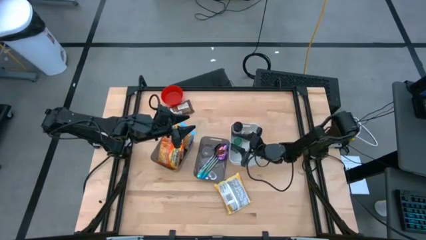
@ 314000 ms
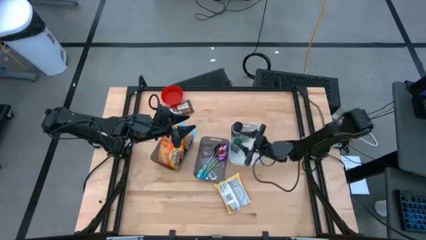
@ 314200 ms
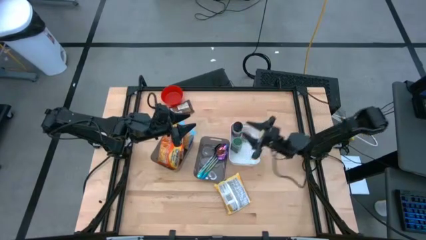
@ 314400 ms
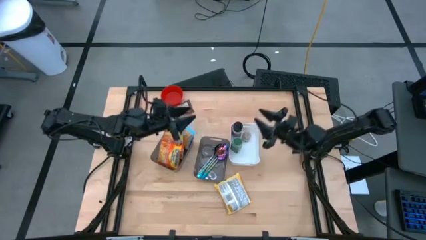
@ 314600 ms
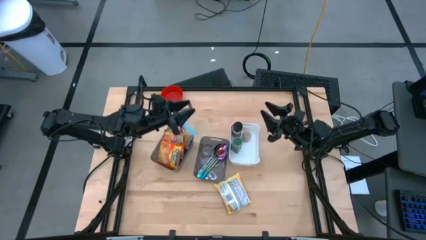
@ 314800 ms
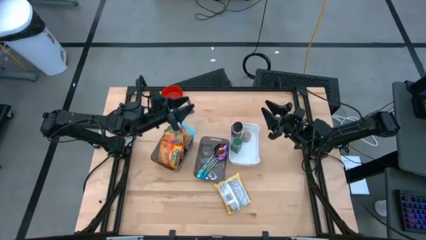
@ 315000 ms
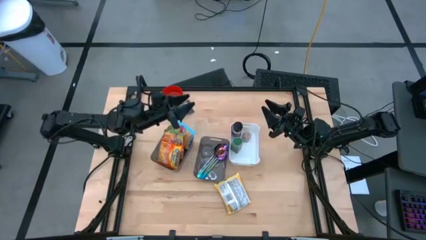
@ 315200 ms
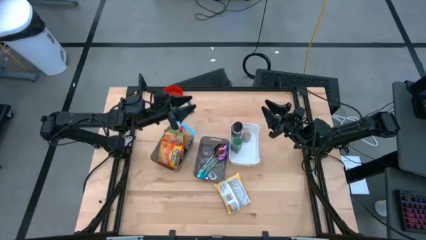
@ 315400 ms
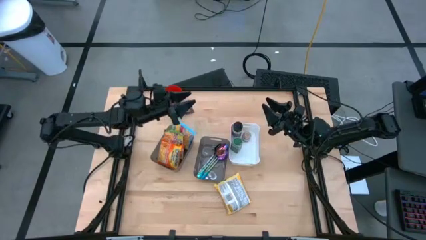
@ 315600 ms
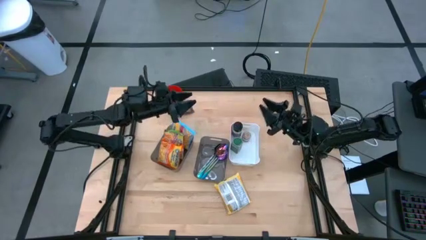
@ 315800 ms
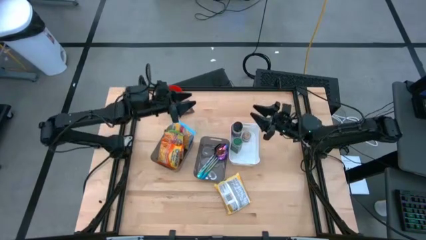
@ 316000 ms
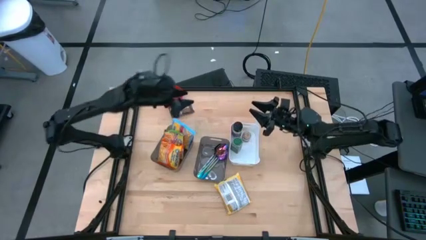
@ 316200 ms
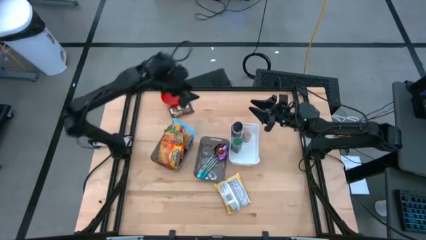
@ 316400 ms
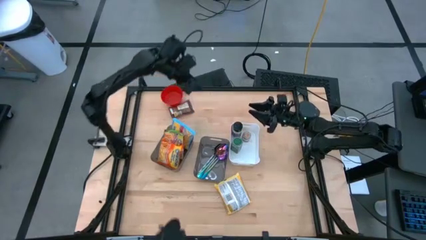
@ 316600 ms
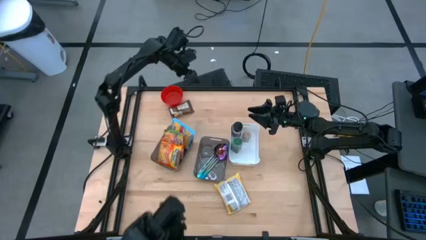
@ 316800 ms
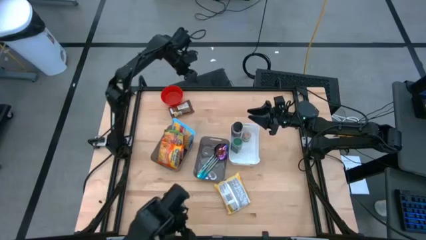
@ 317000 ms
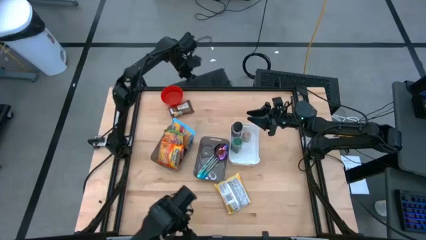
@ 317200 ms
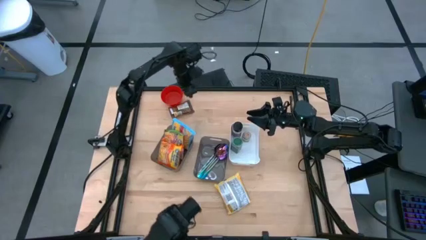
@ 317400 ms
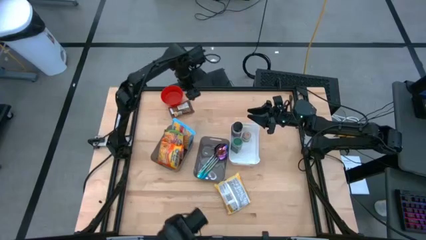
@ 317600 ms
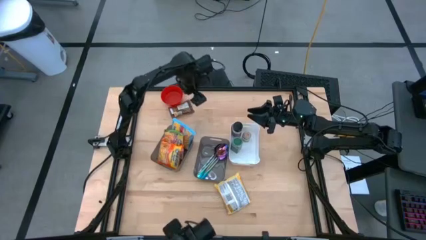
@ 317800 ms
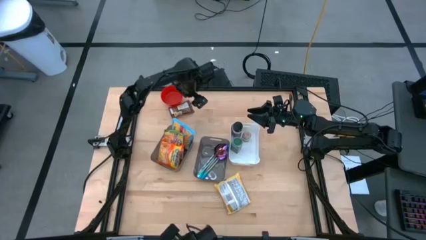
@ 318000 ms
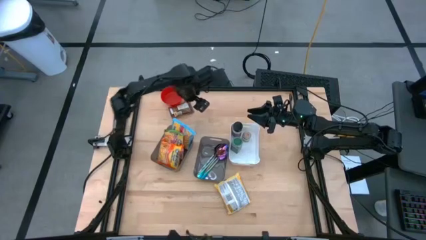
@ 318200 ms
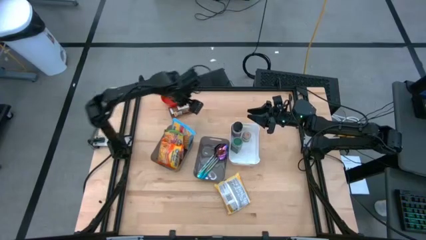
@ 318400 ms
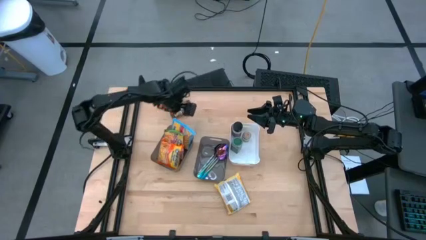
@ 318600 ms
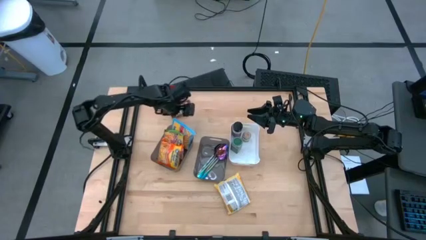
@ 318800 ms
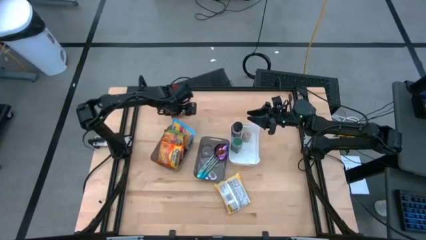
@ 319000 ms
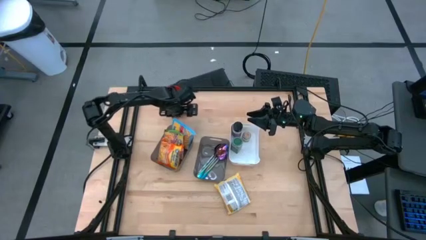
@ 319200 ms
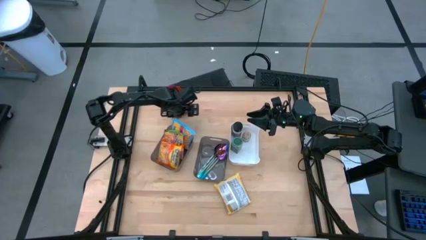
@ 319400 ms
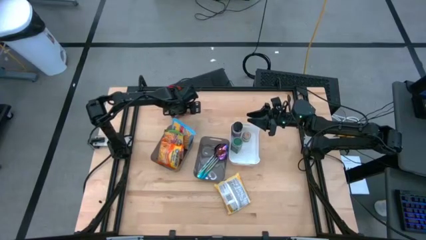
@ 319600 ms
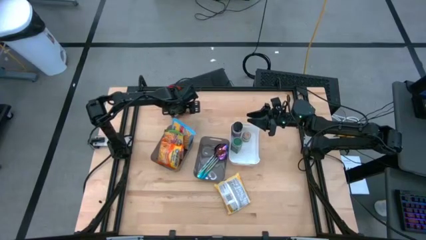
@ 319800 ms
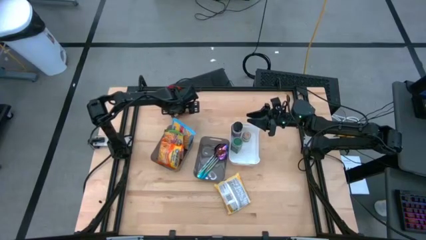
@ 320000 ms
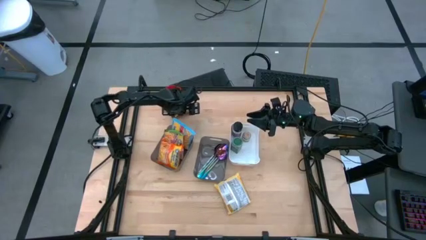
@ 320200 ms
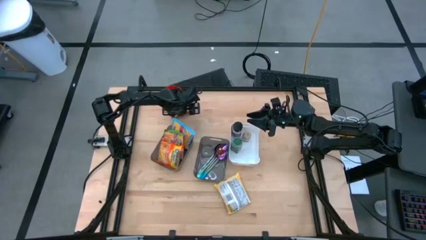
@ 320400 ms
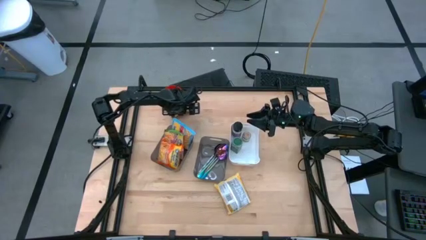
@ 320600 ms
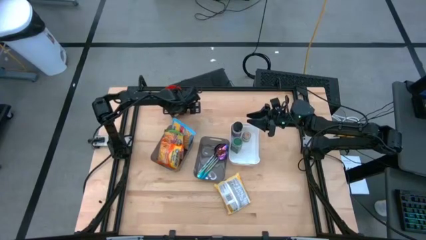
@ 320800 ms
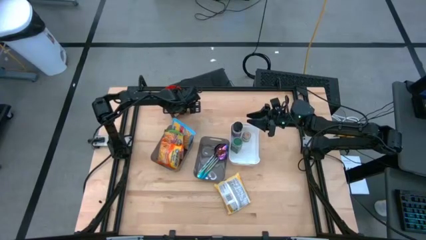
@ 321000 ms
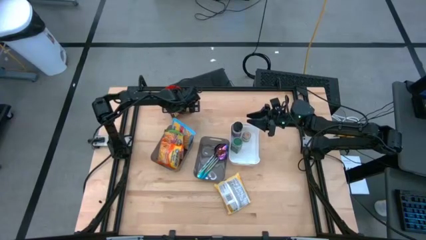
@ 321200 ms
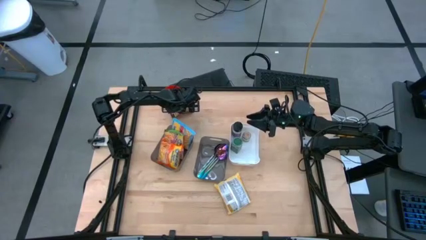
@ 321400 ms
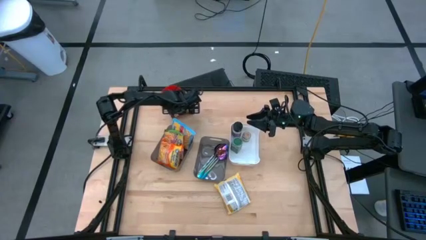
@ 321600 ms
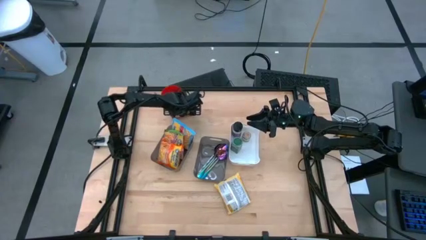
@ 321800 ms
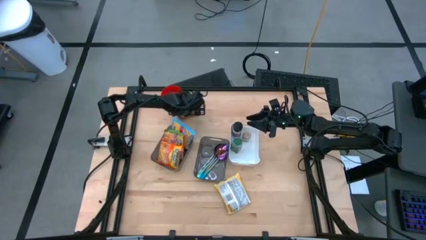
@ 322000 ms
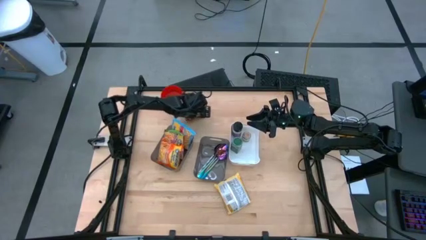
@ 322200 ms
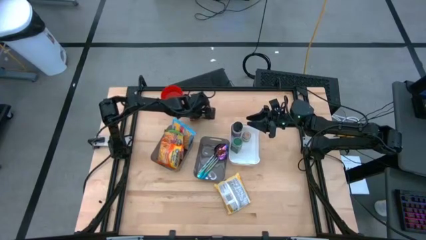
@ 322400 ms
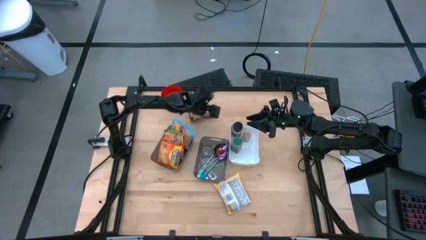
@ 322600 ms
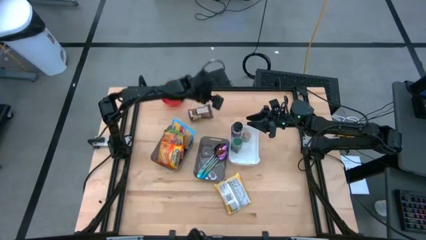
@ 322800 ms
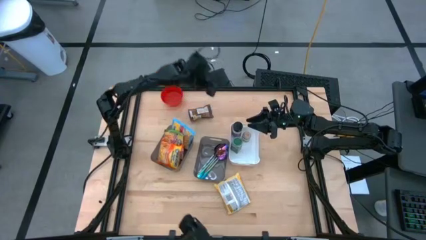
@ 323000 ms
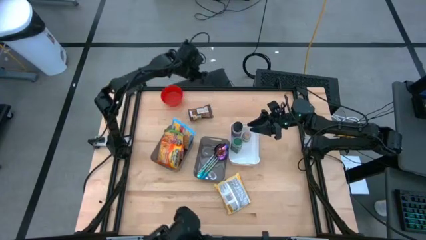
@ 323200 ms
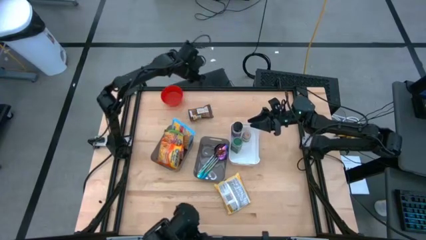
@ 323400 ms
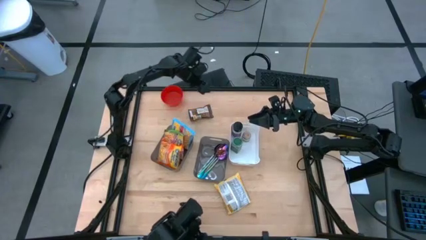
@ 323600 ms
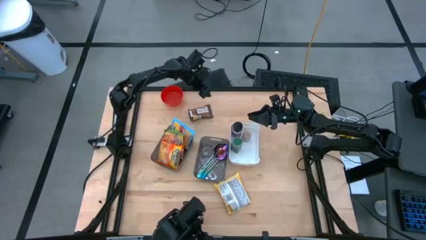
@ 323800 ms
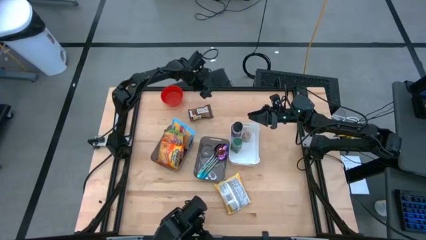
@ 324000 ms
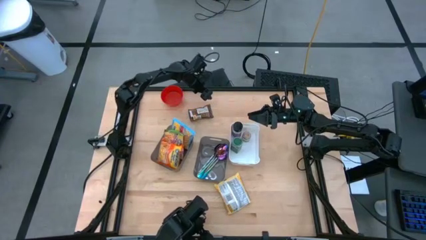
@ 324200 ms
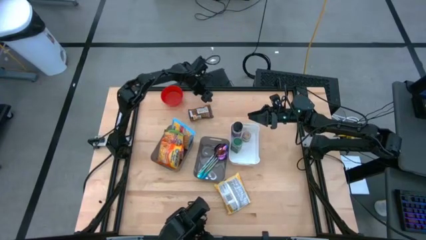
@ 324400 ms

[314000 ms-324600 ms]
Task: Pick & Place Food Item
Put the orange pack into the white bin

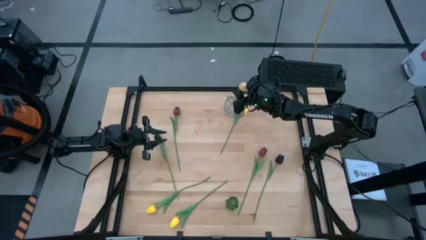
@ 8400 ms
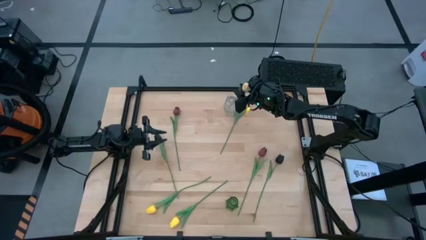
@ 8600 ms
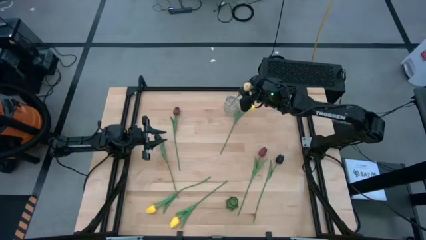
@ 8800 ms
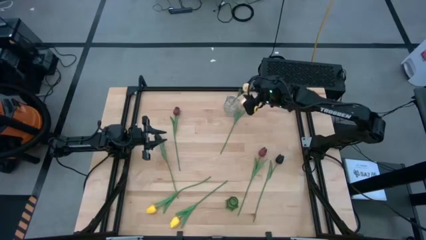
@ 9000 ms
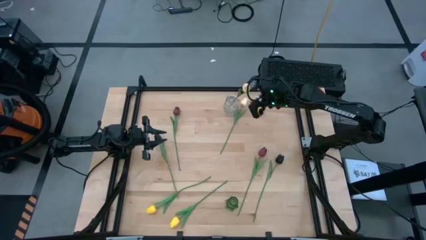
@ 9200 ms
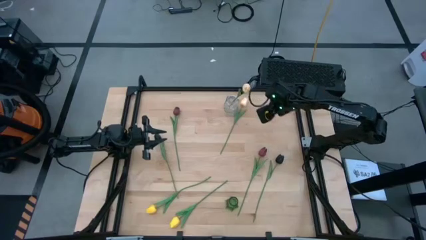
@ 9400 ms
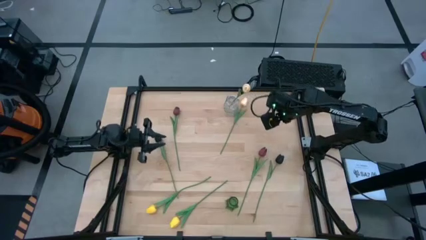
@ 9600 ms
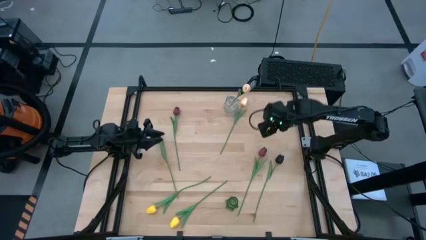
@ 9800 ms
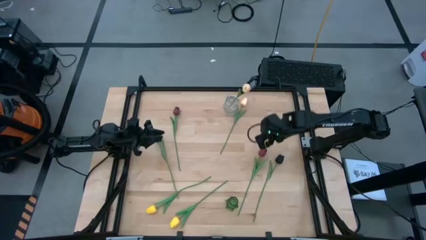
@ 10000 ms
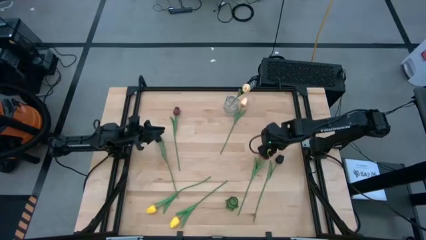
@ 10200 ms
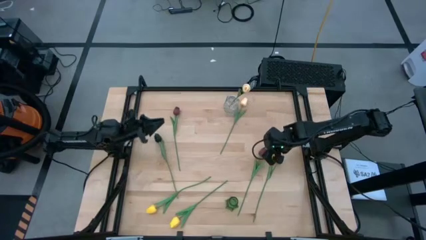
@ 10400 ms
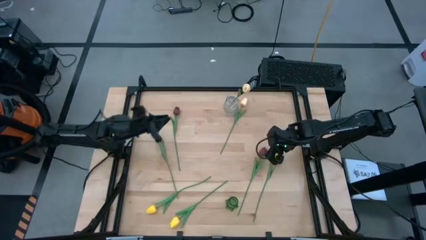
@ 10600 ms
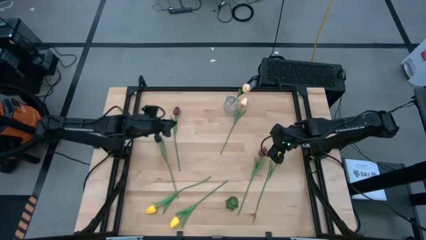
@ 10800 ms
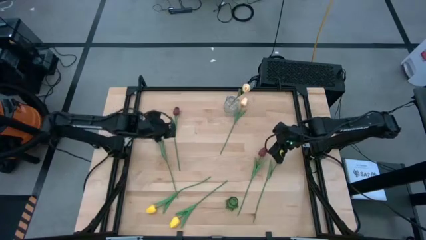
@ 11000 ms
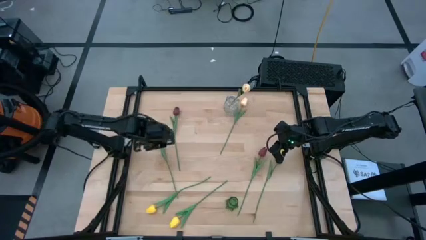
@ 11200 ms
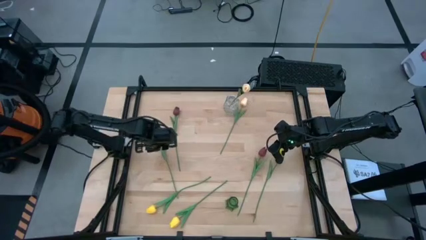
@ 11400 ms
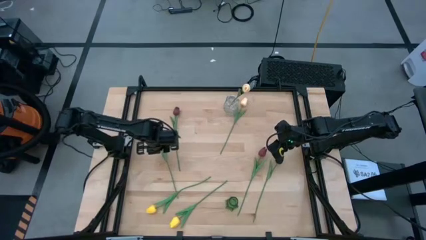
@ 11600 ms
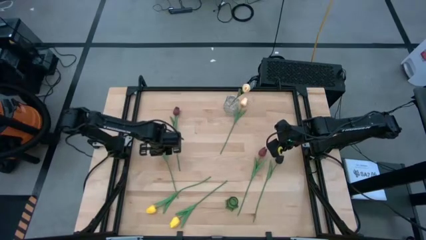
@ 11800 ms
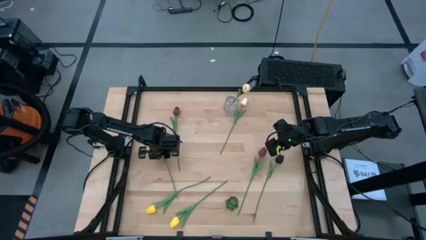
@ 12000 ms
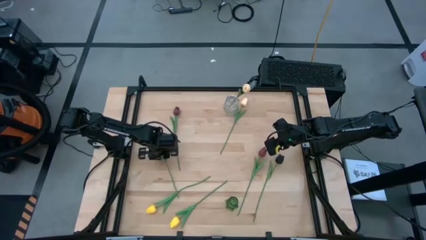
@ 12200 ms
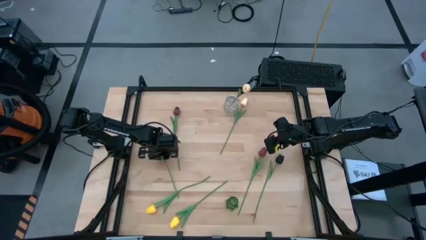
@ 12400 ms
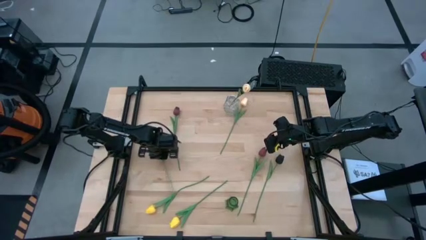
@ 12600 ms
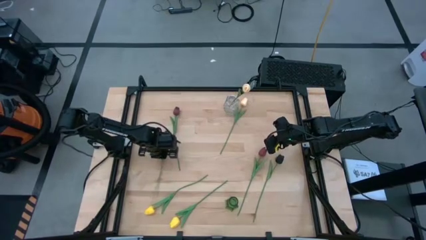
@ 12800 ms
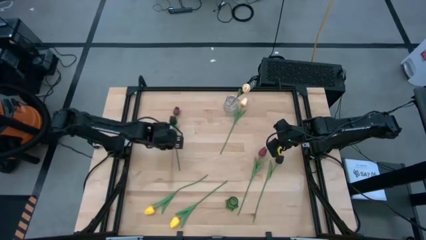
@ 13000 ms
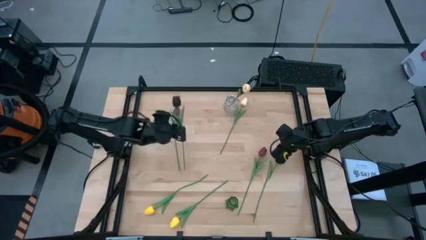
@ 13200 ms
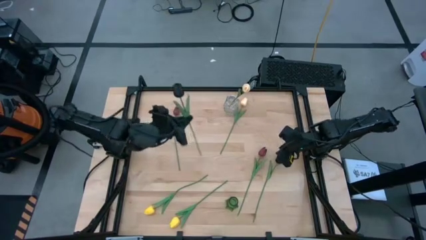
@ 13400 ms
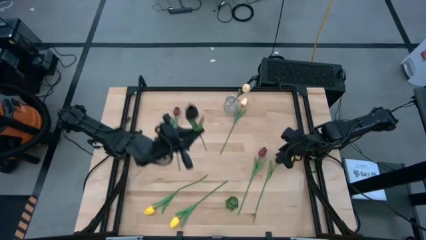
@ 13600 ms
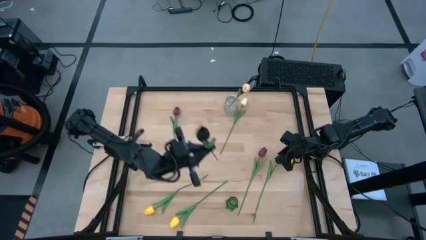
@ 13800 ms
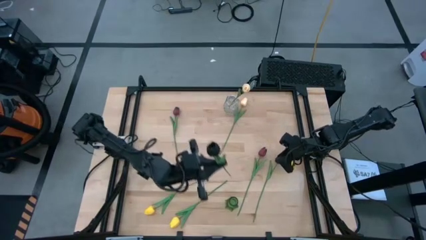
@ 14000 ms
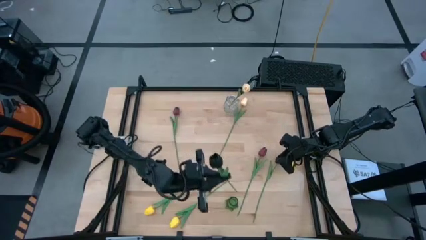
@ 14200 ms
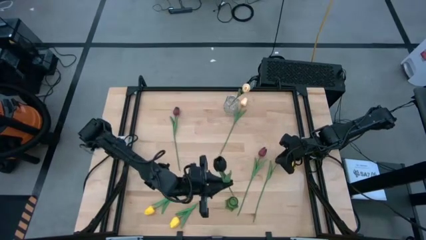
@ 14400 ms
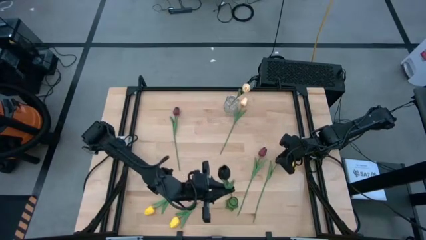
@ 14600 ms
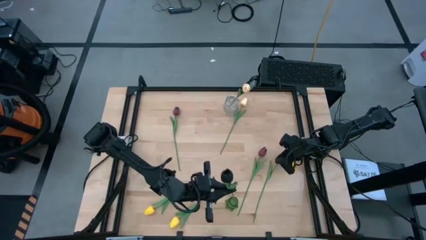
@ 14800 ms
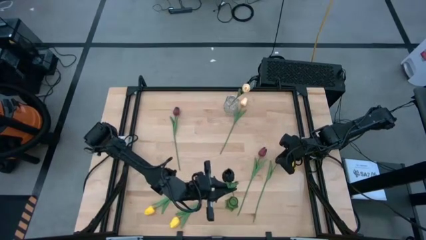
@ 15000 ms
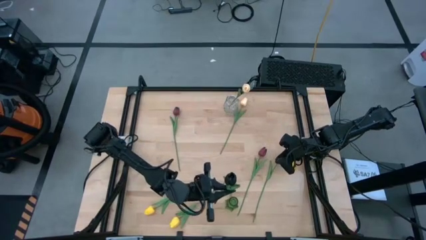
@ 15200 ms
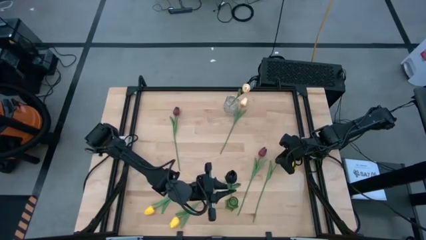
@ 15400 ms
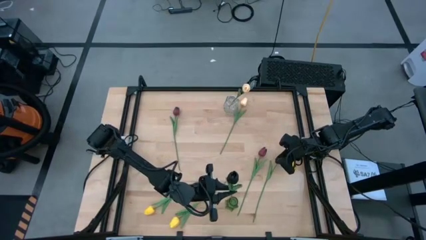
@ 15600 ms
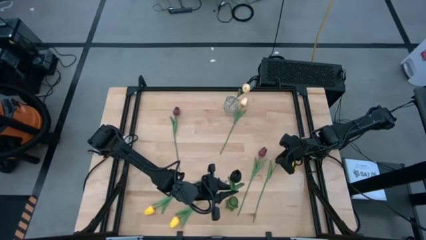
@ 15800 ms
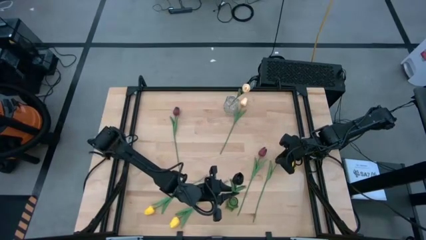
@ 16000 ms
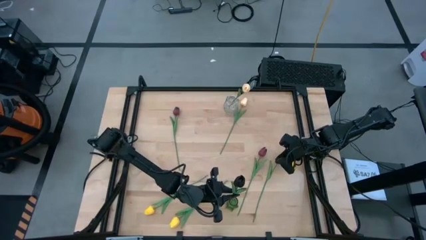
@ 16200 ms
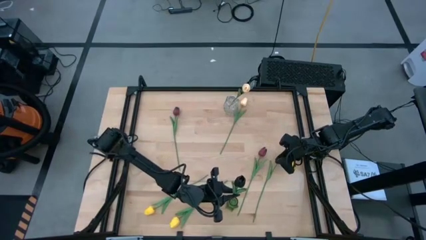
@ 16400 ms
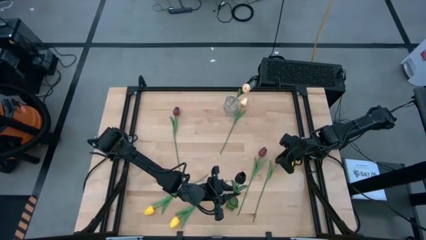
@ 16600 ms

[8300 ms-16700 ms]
Task: Sort flowers into vase by color
Put the left black tulip into the green flower vase
